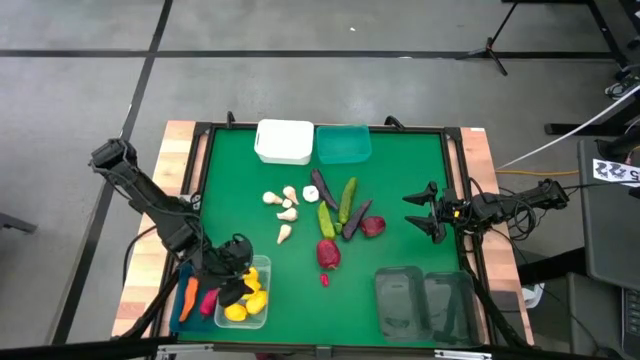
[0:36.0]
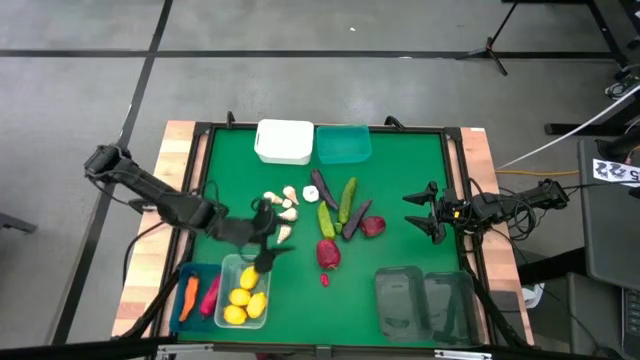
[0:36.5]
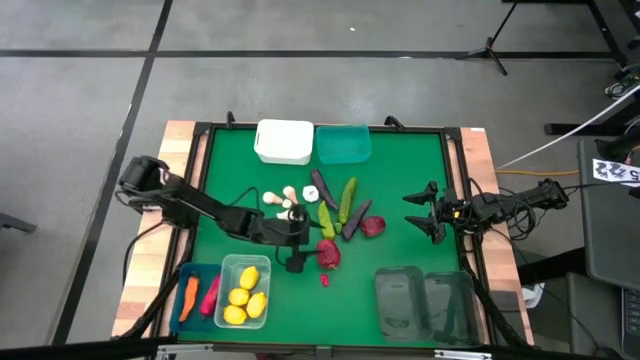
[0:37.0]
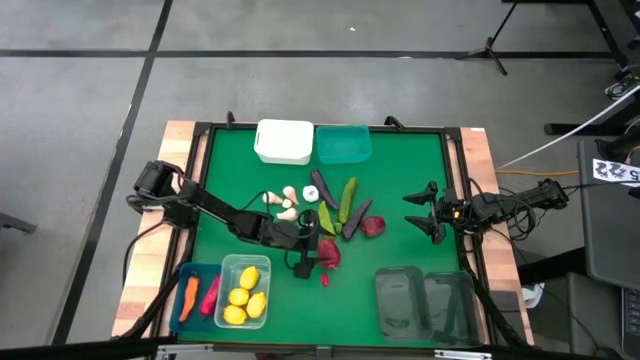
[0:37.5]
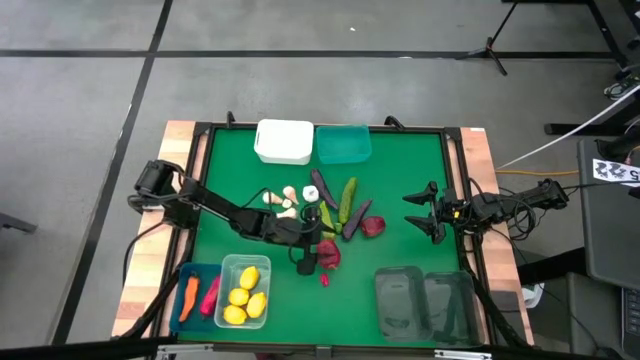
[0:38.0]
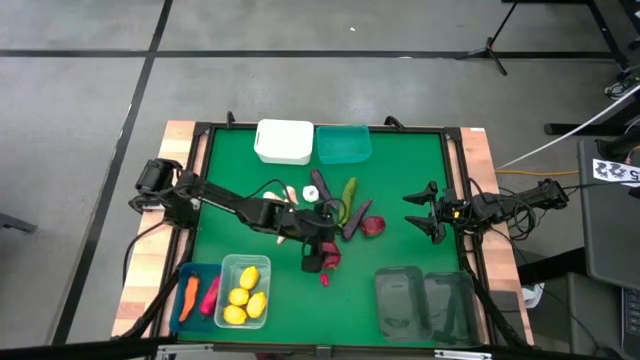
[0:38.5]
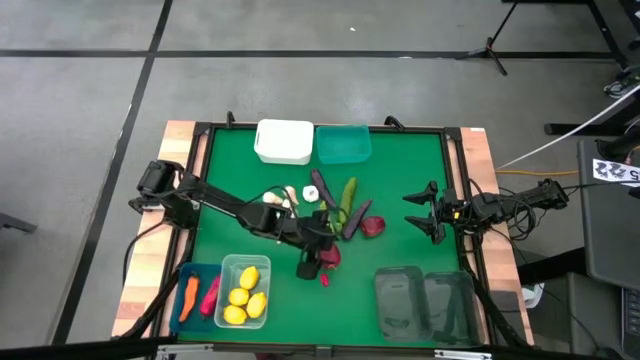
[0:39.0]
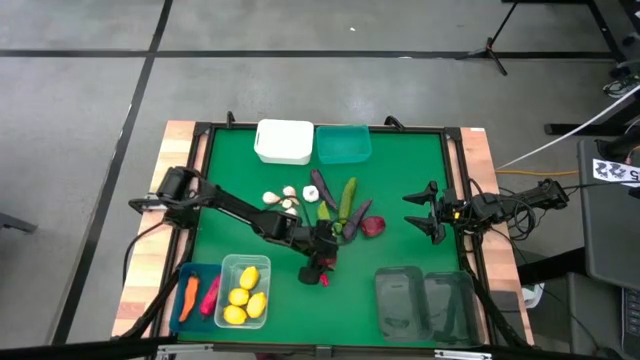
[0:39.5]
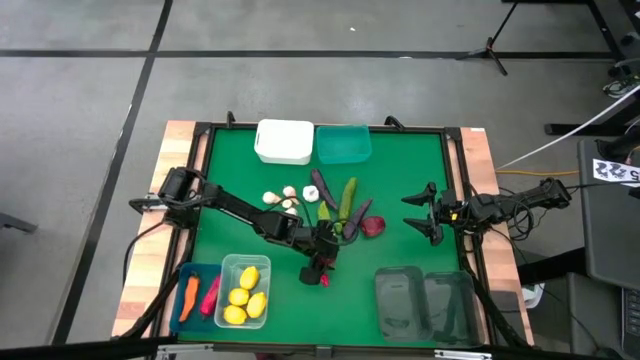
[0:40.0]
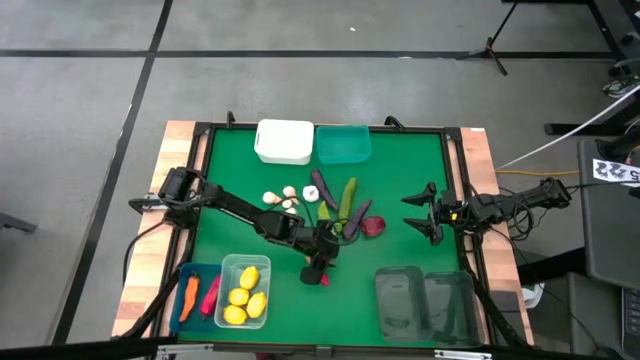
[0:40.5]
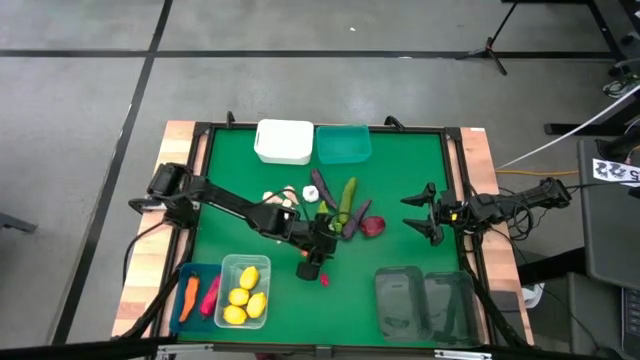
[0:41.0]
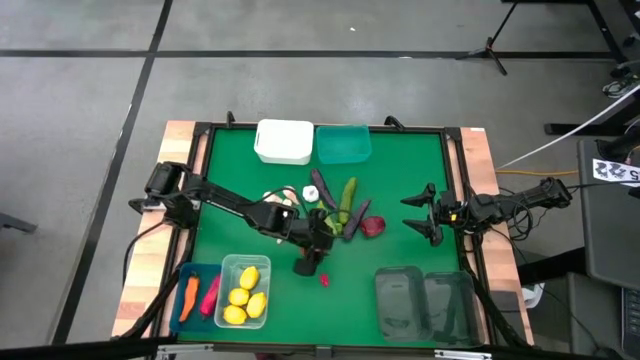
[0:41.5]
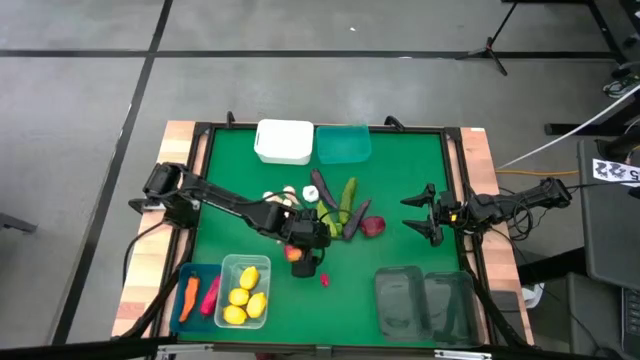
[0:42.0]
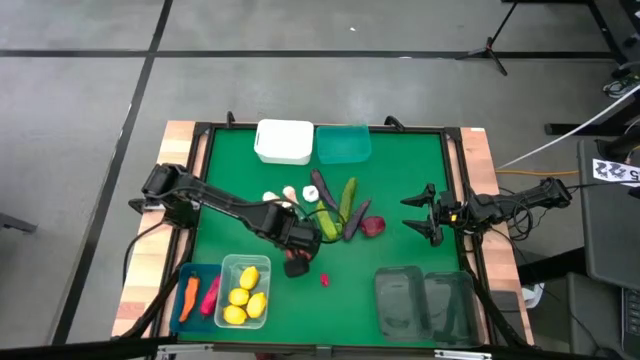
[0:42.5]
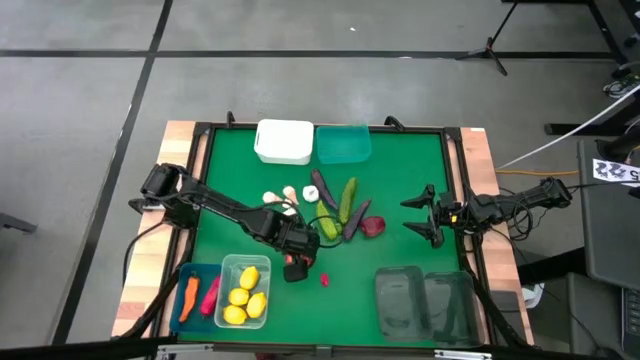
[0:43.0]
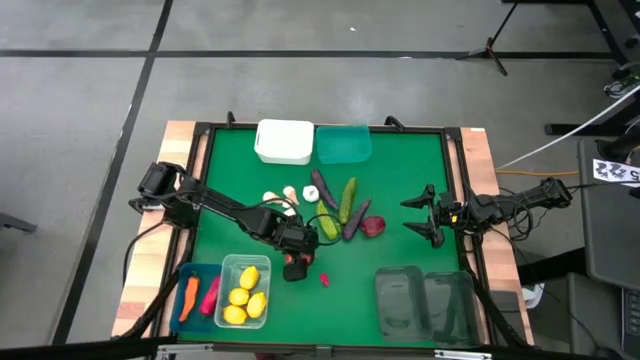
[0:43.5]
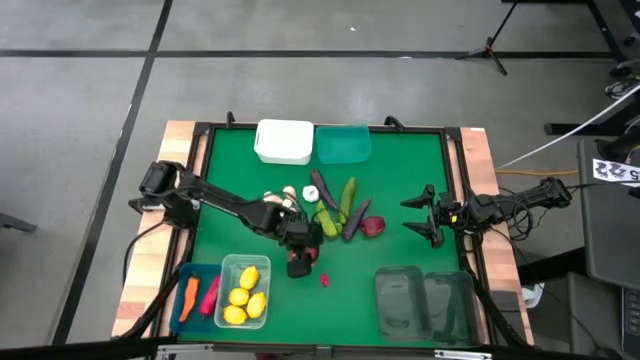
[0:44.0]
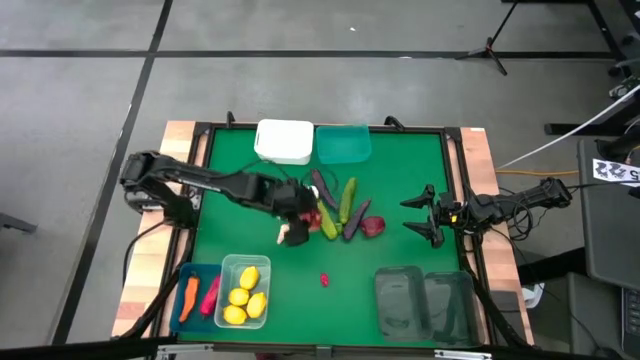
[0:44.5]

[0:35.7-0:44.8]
Task: Sort produce into baskets
Put the apple into the white bin

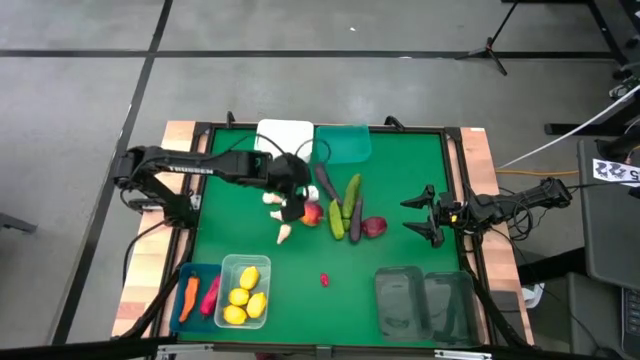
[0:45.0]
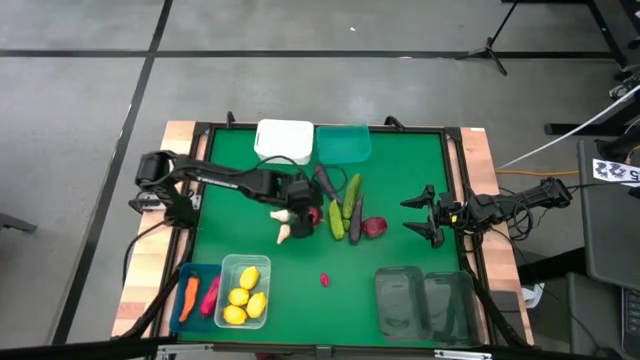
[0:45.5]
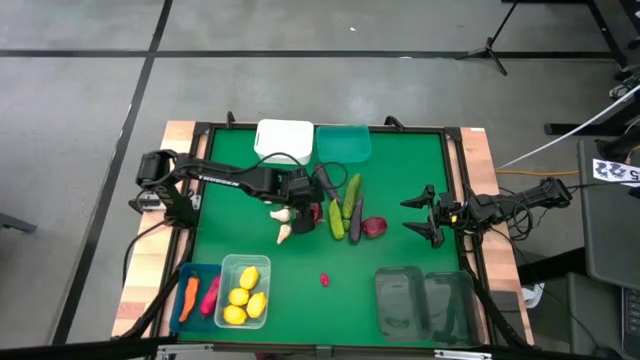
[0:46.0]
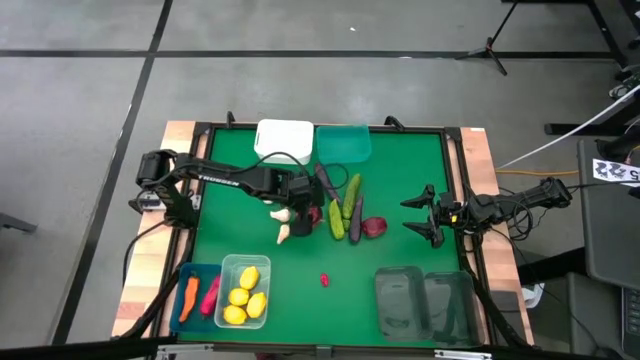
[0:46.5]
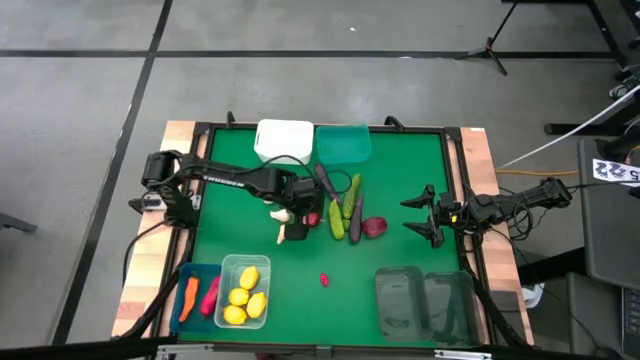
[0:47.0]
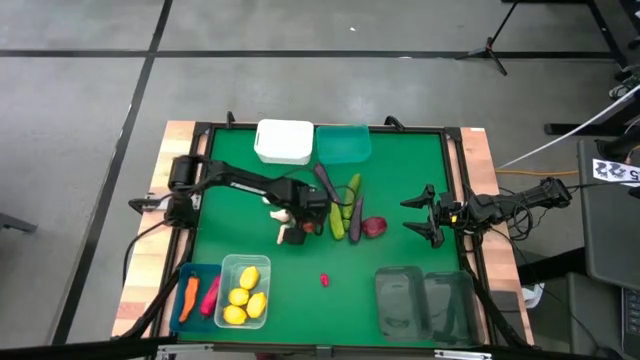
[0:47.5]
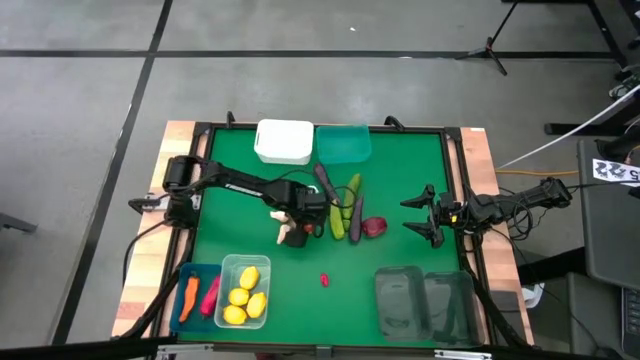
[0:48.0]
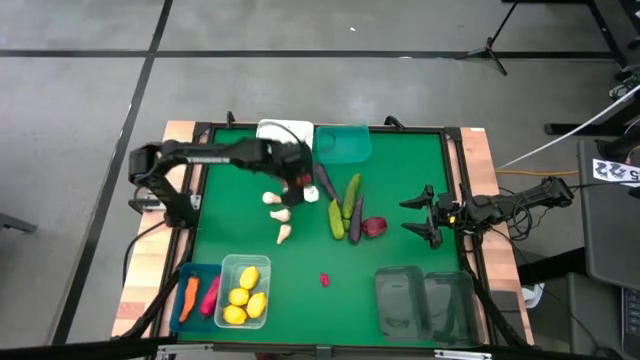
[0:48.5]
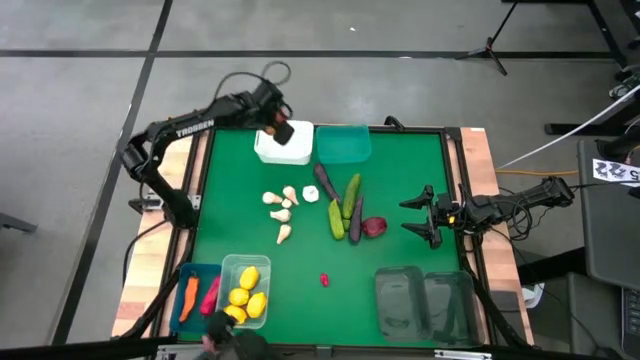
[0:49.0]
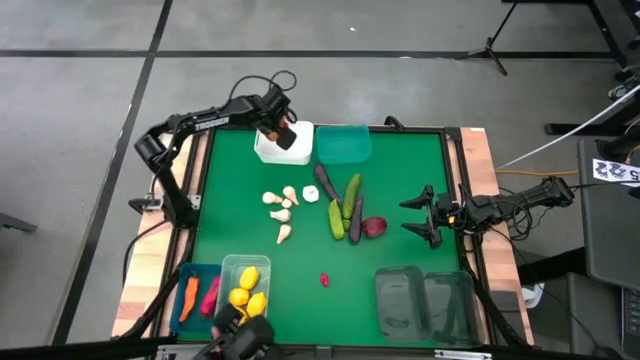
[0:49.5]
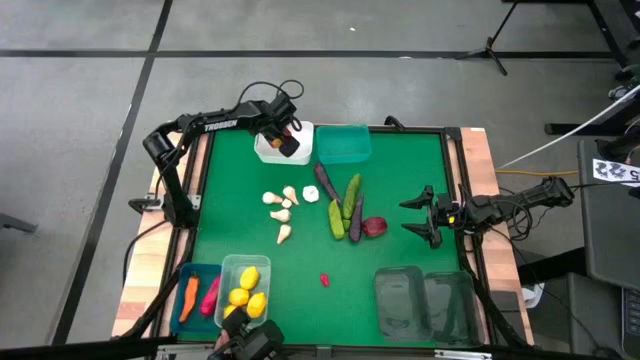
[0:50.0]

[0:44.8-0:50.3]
Put the apple into the white bin

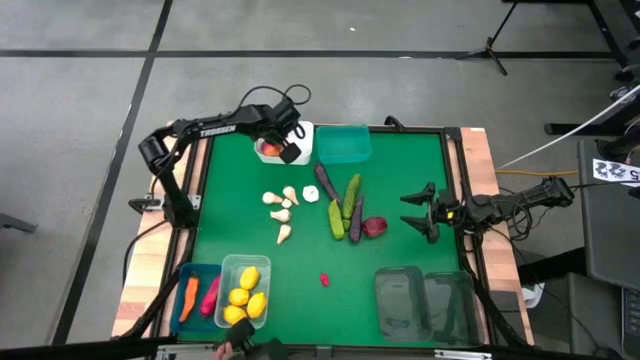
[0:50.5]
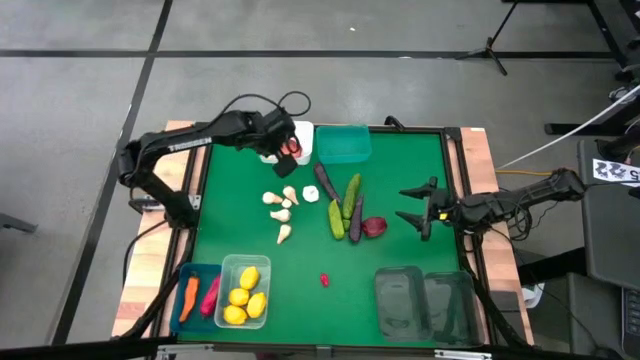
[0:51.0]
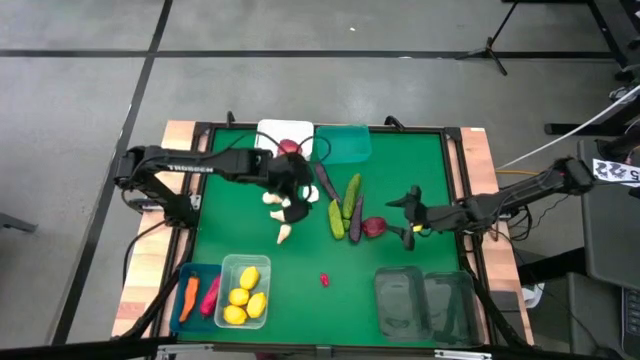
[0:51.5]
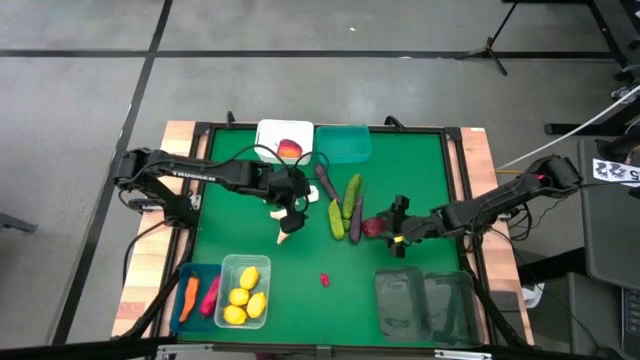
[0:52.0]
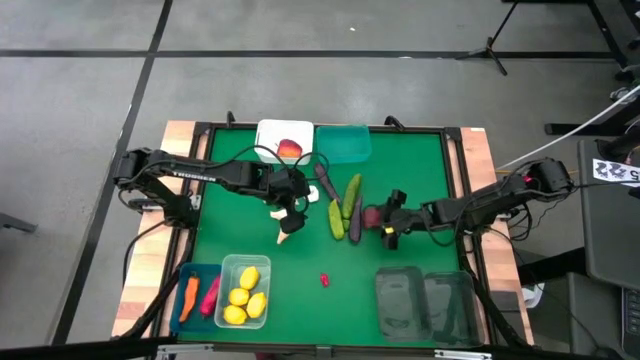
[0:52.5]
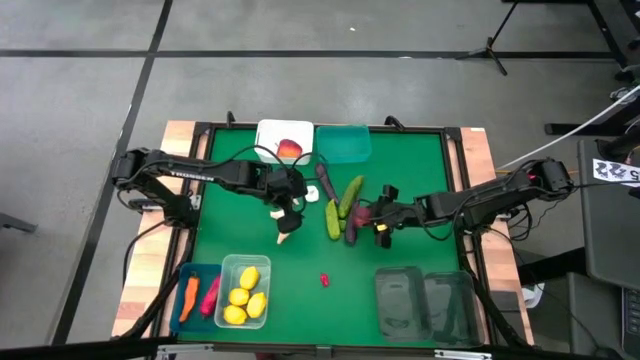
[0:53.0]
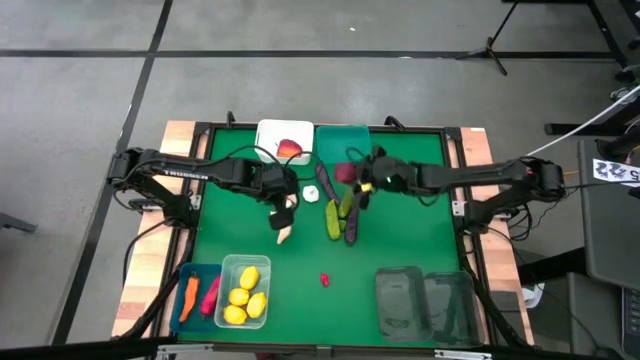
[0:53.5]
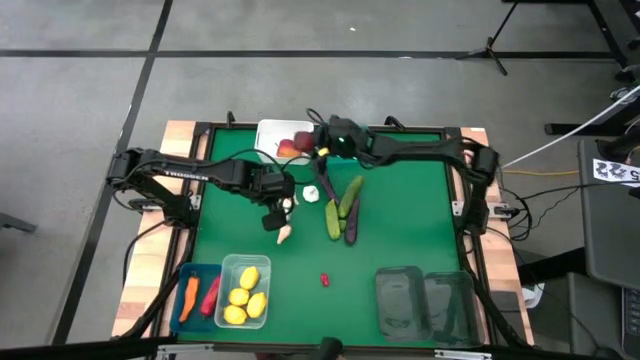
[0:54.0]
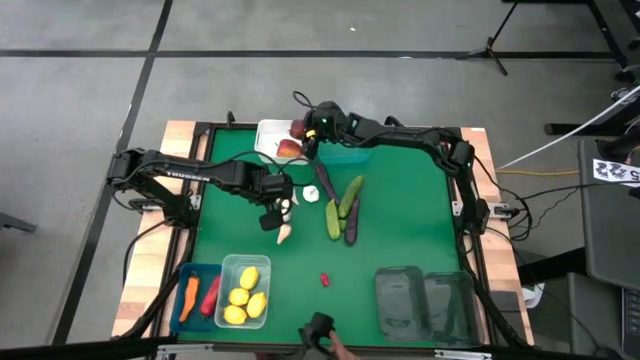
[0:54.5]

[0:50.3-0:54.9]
Put the apple into the white bin

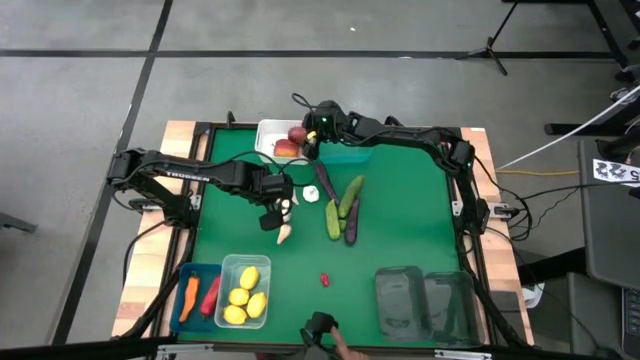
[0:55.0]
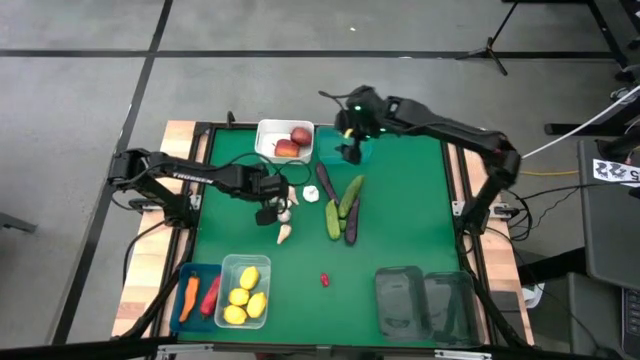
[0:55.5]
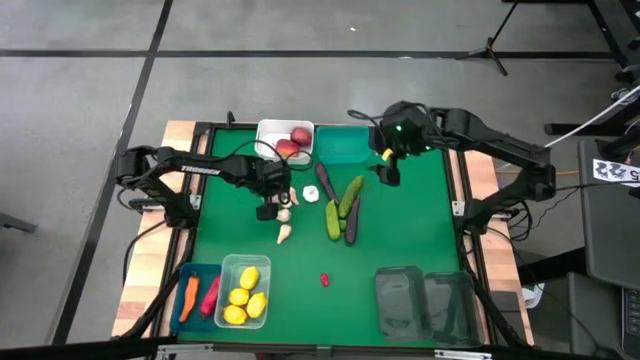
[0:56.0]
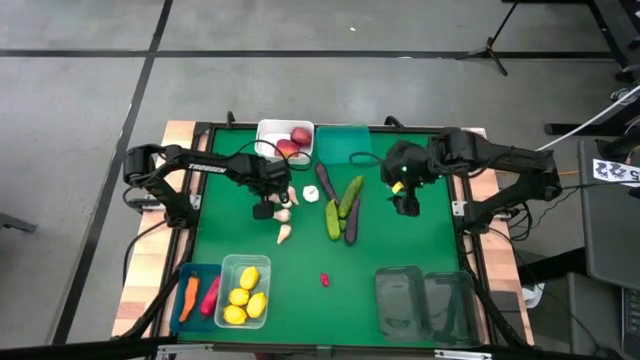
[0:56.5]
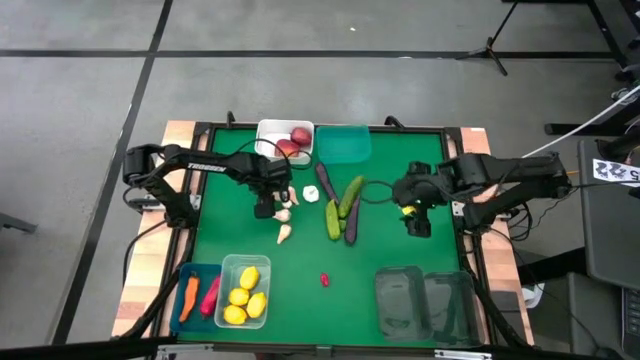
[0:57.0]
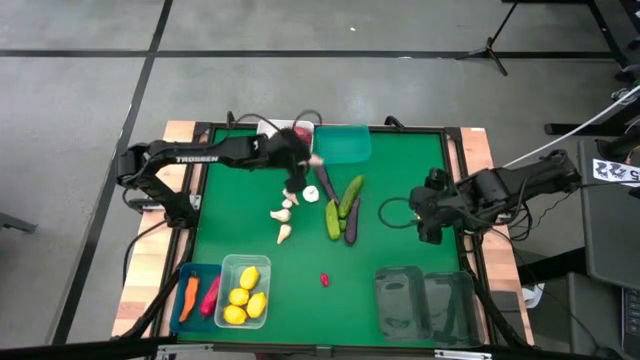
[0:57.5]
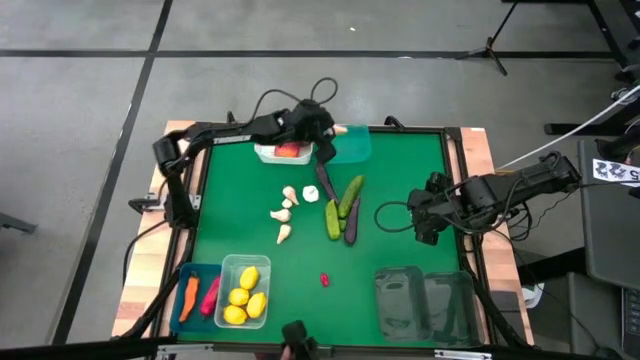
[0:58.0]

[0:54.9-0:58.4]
Put the white garlic into the green bin

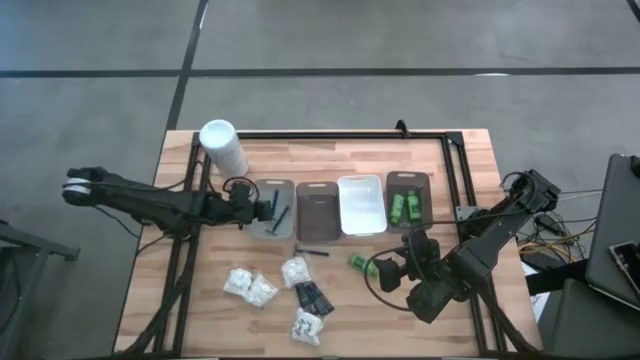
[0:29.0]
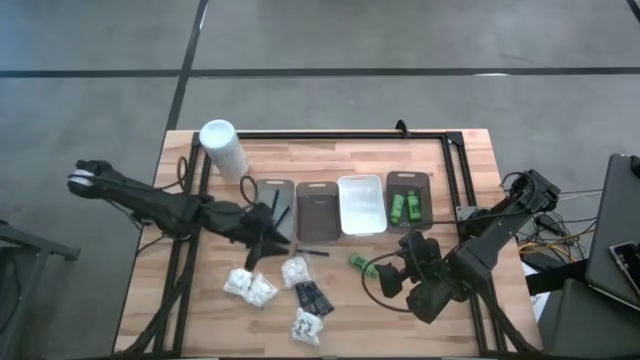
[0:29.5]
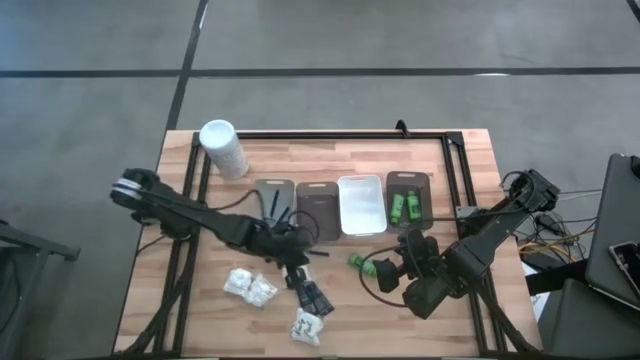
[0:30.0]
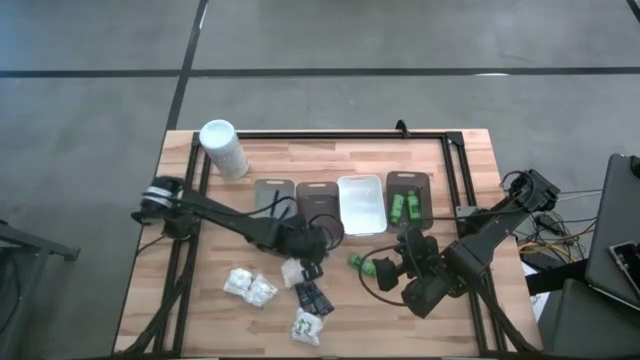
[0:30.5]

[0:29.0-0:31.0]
Task: Pick & Place Travel size toiletries
Adjust the left black bin on the table
